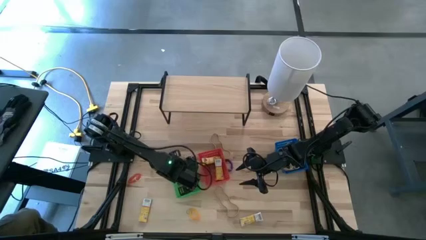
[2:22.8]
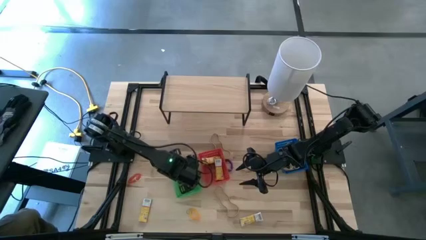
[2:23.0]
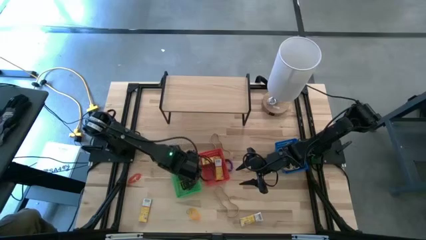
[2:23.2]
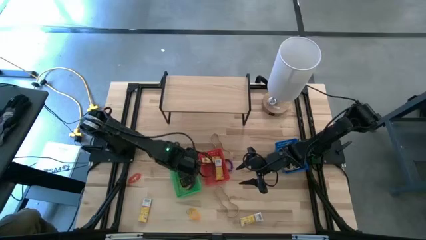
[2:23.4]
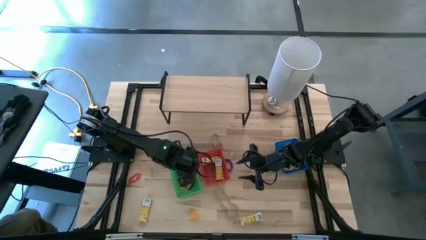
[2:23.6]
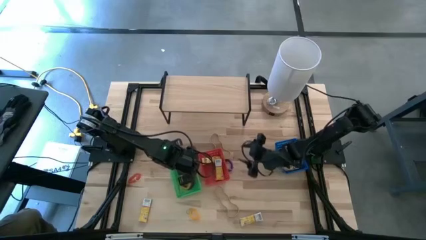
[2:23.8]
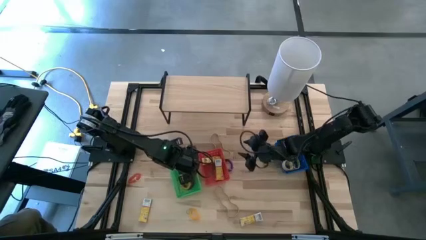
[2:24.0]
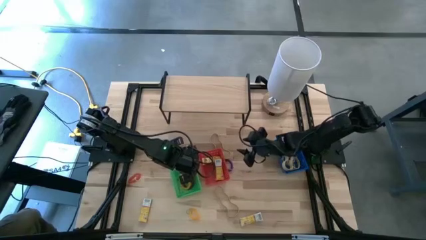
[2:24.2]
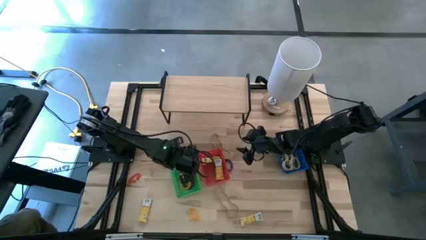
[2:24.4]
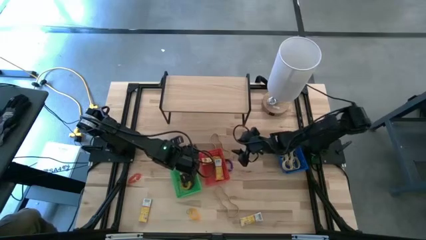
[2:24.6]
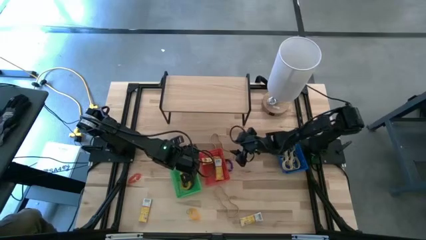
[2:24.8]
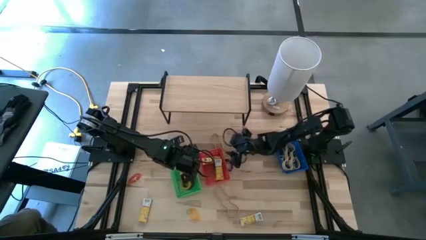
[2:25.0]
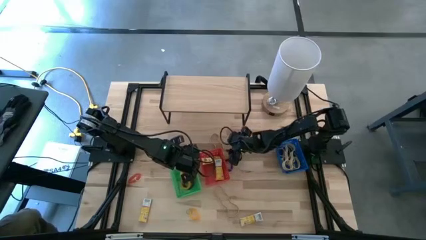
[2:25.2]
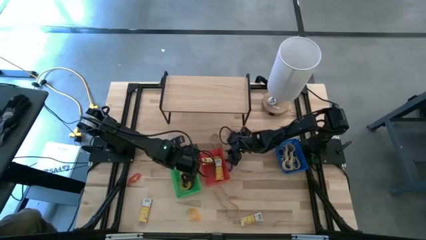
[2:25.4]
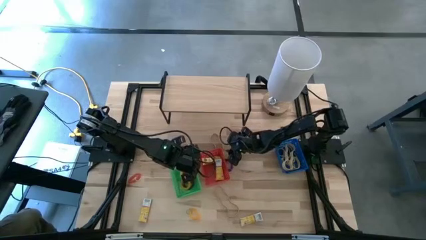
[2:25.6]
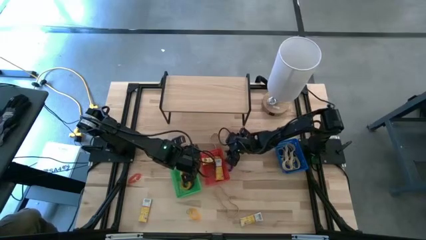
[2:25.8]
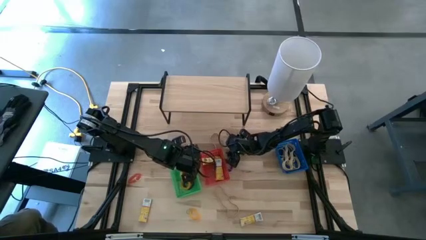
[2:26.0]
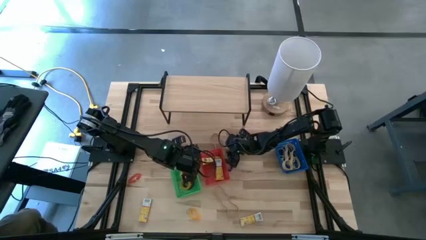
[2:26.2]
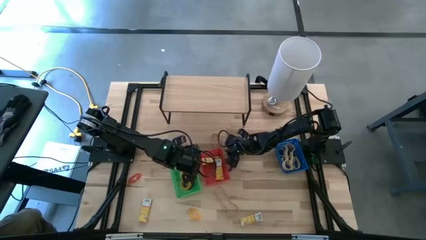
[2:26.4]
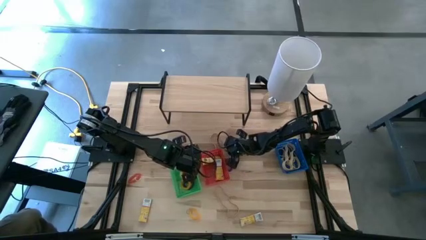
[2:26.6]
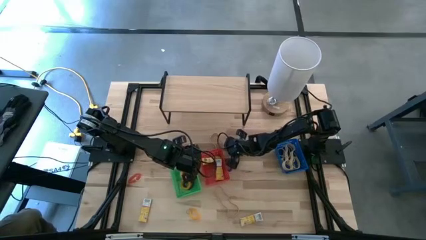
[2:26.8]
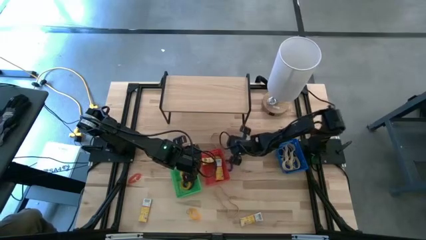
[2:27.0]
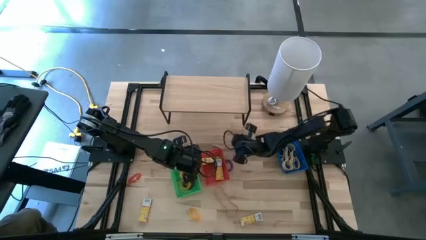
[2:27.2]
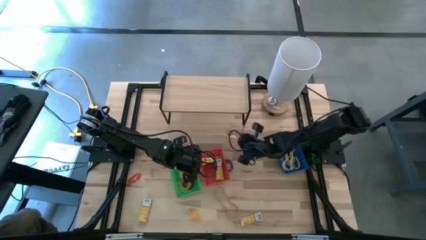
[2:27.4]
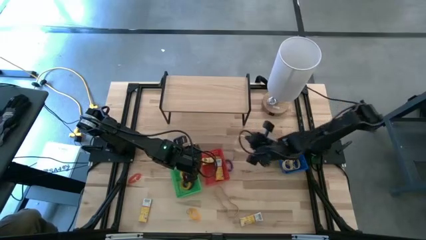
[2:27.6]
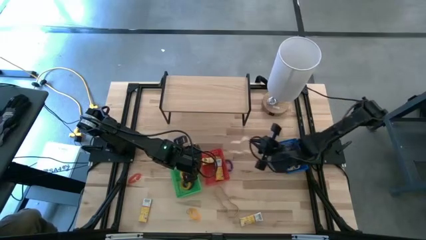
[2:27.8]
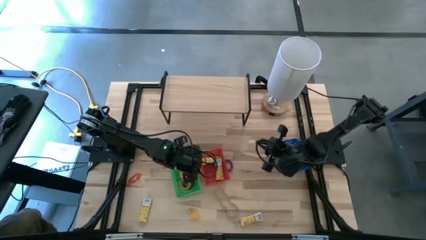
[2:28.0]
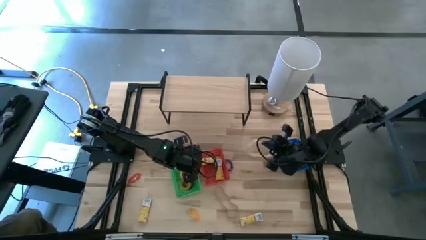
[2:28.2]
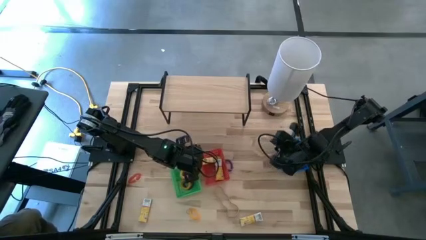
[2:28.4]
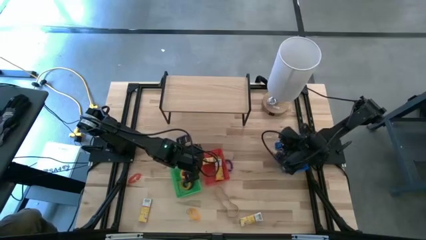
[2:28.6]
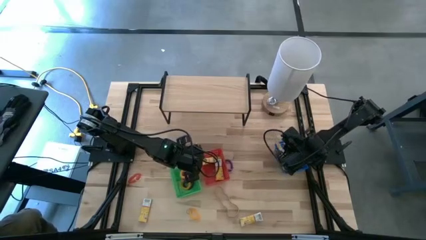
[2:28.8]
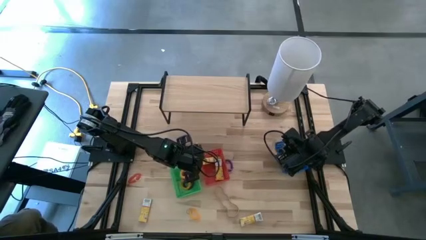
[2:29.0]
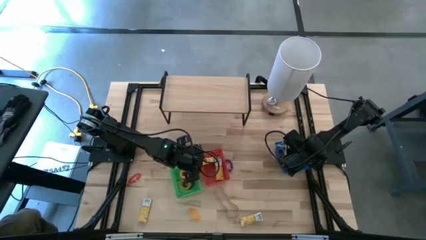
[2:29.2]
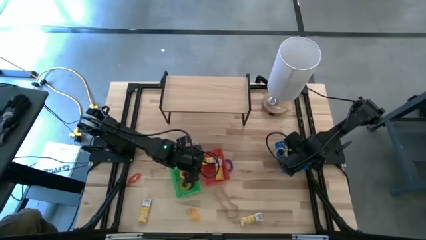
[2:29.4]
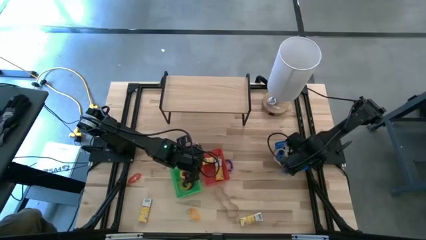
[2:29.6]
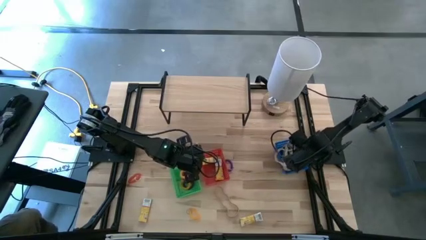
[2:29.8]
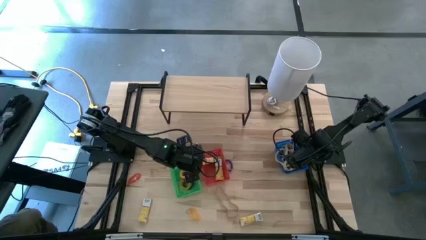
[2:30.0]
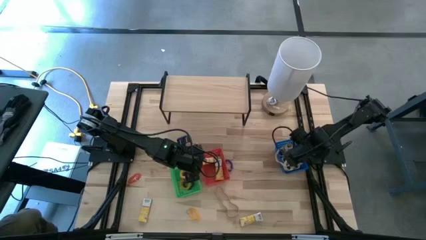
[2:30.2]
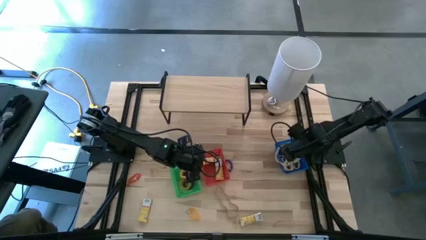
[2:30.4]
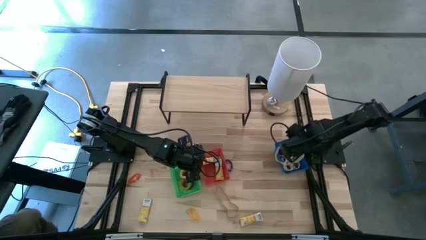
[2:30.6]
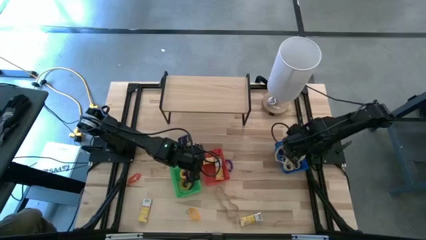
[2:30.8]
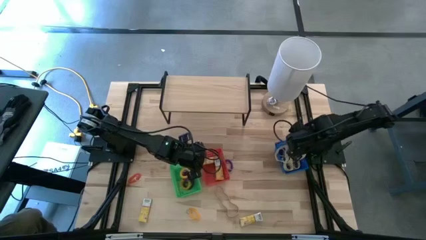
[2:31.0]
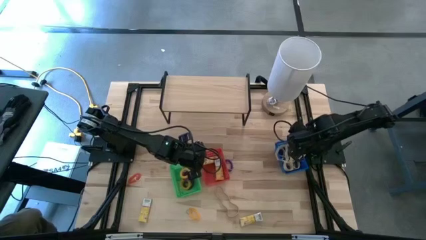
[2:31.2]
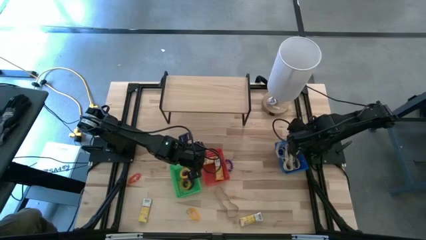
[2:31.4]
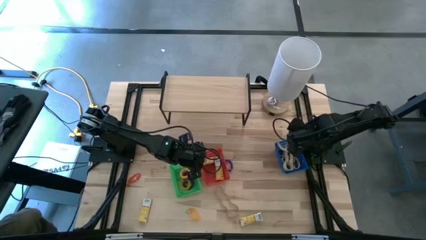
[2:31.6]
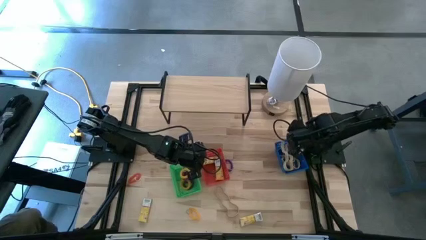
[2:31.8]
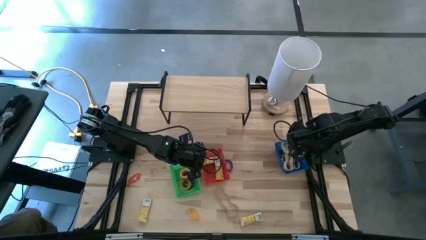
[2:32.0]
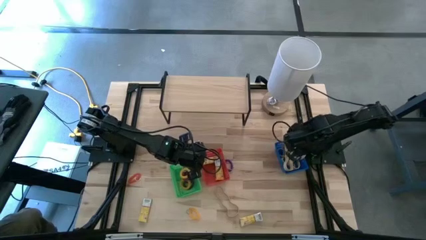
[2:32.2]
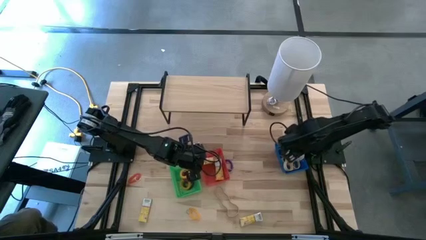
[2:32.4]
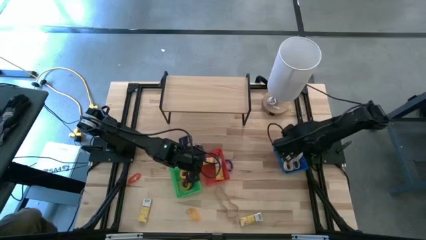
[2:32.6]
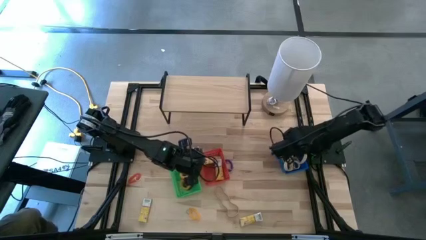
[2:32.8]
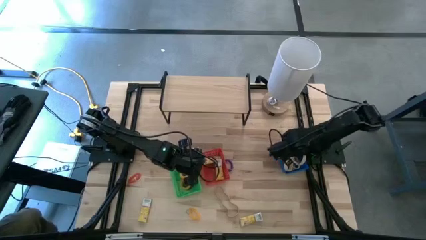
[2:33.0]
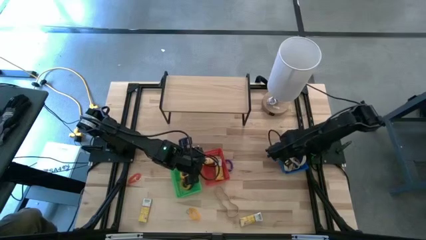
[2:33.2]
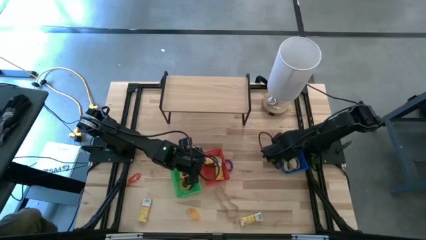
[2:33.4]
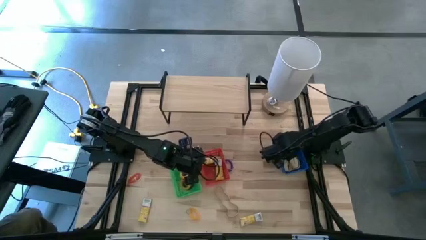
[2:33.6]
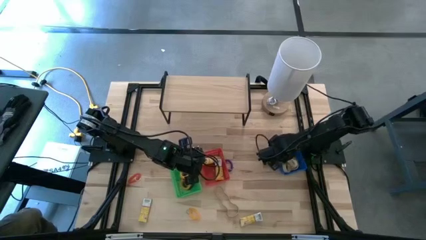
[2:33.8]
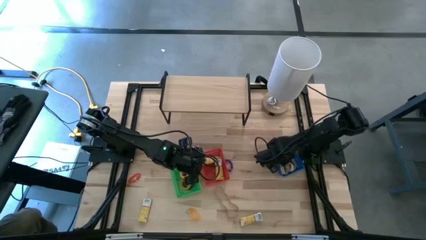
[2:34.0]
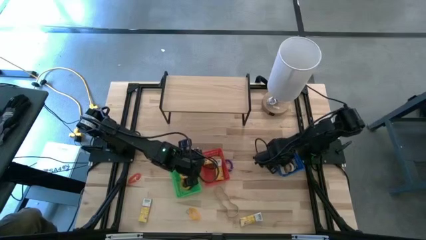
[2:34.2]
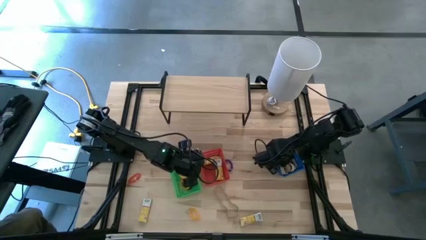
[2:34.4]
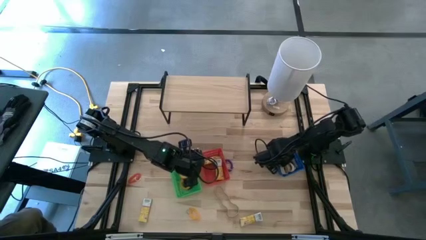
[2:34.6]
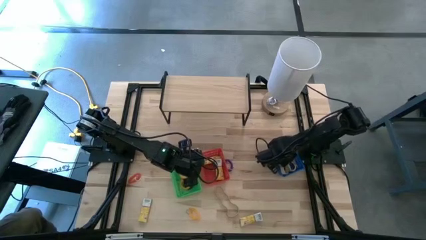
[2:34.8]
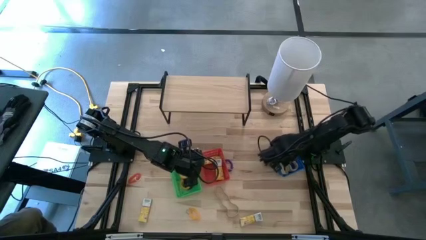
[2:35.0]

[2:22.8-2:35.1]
Task: Pick & Place Office Desk Supplies
Put the white rubber band into the blue bin

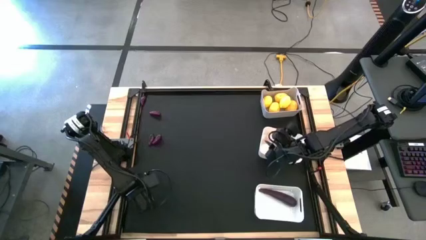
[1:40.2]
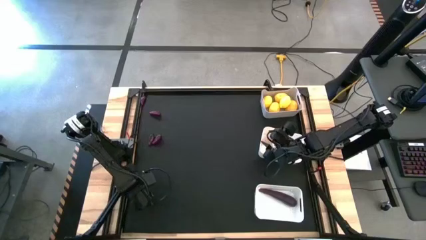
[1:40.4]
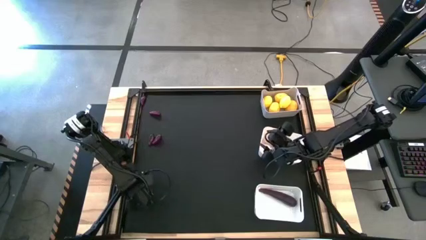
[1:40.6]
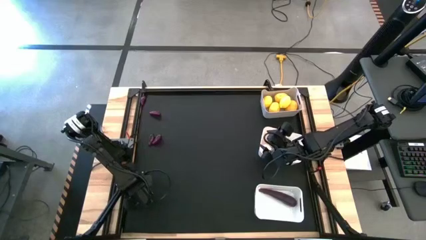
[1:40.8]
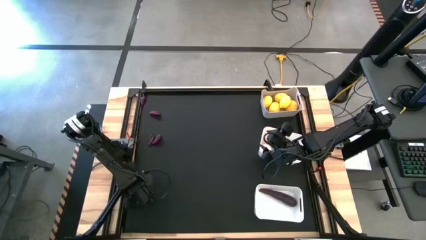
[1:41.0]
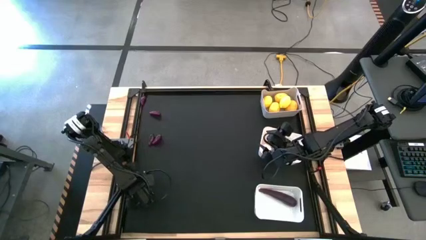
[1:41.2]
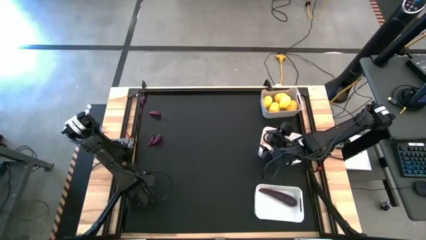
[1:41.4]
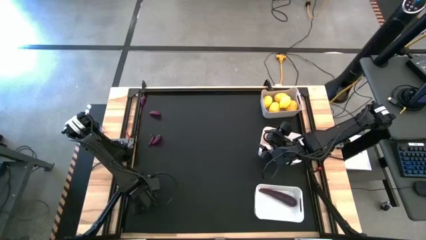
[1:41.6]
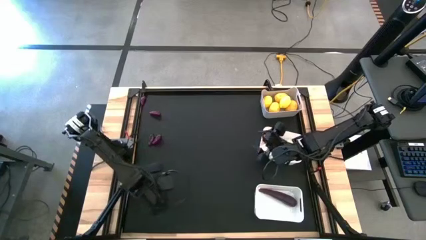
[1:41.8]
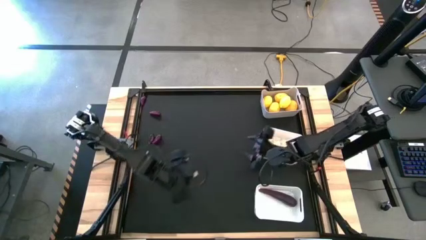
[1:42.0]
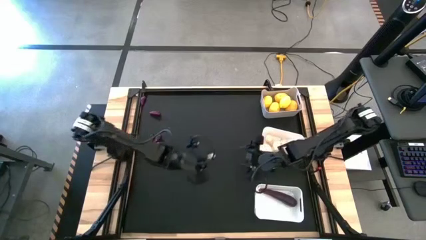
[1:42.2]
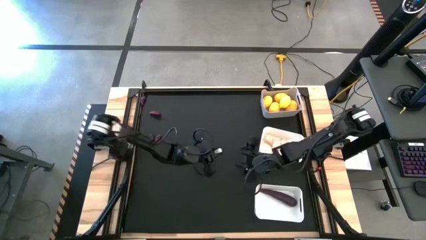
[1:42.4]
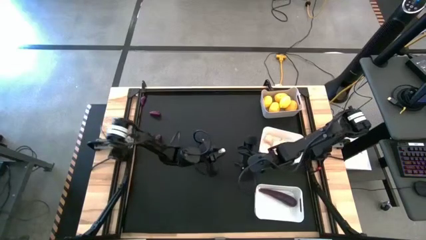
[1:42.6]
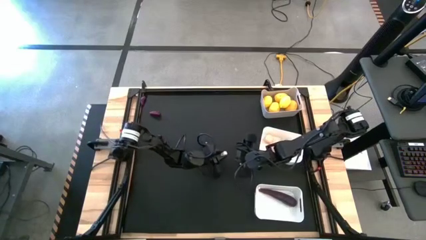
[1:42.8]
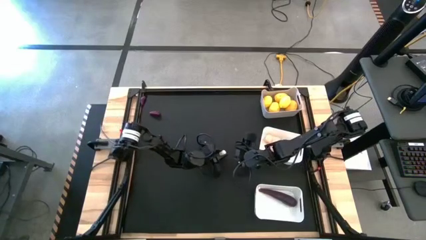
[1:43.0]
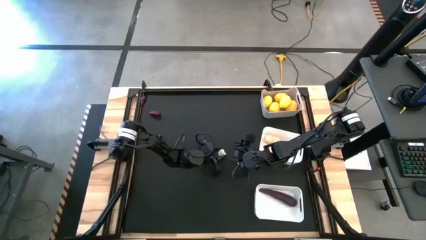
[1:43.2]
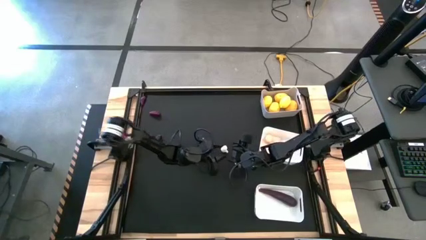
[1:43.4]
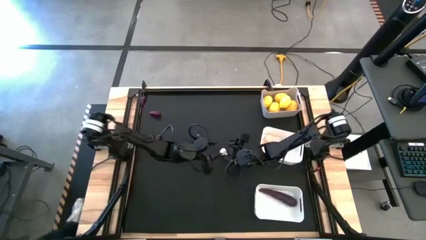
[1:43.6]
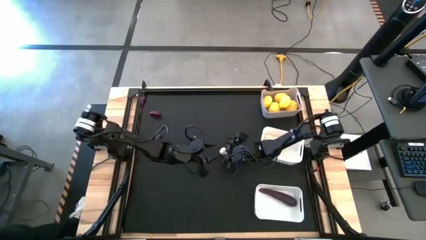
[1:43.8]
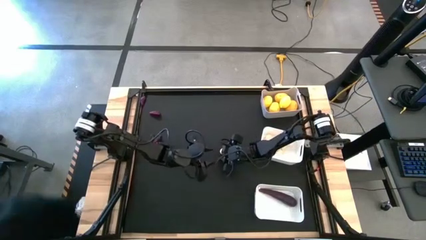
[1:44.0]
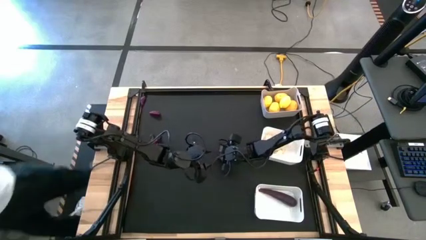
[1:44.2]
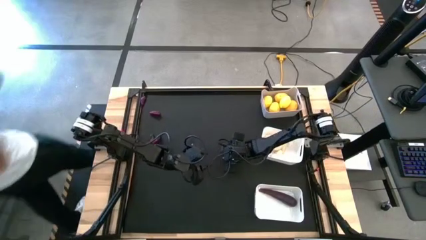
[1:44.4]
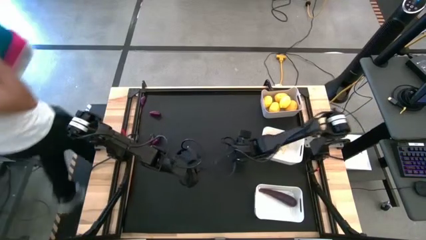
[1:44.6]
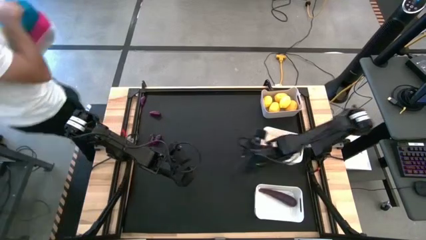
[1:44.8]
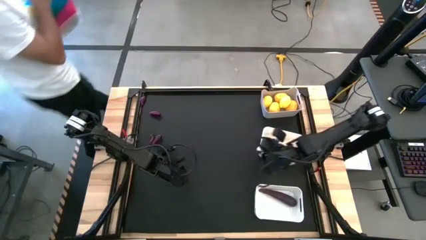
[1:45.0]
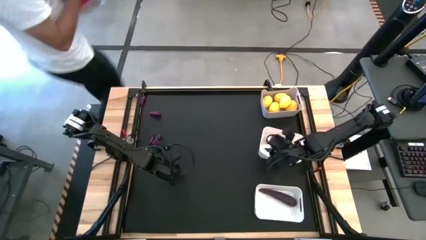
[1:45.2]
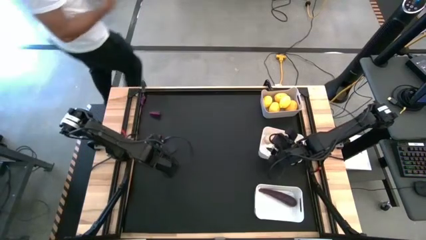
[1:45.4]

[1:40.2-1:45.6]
Task: Sort produce into baskets
Put the garlic into the top white bin
